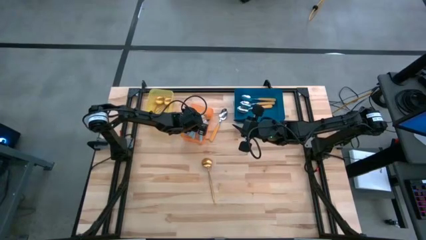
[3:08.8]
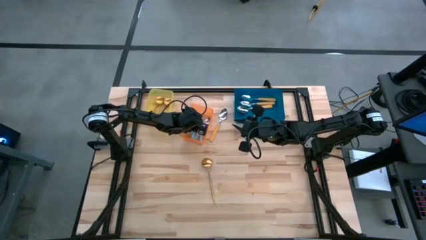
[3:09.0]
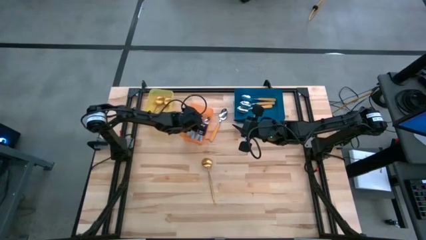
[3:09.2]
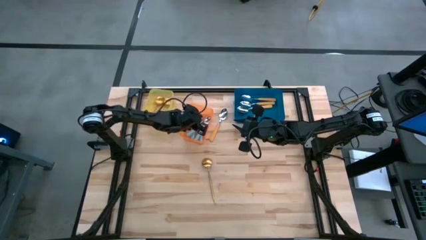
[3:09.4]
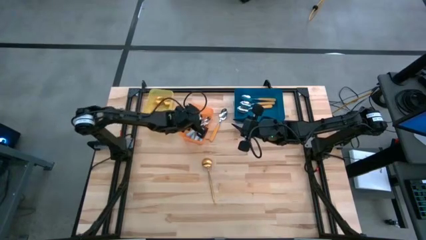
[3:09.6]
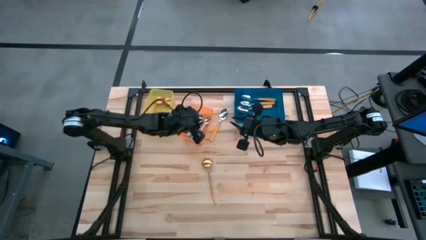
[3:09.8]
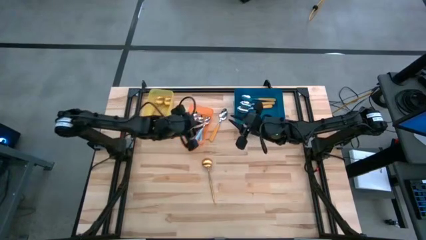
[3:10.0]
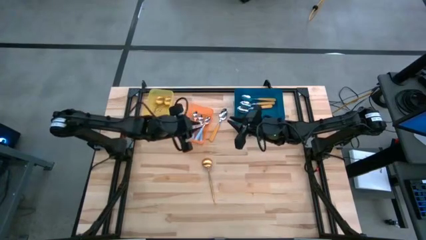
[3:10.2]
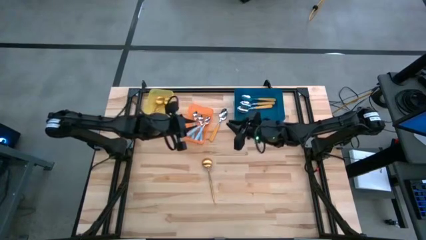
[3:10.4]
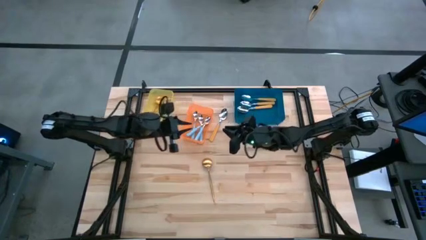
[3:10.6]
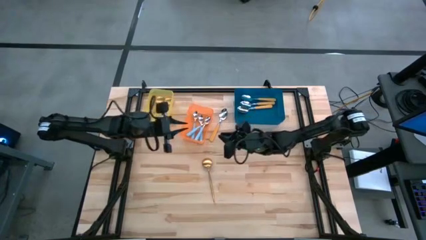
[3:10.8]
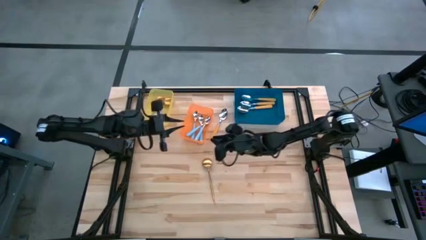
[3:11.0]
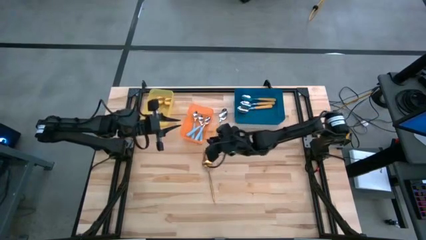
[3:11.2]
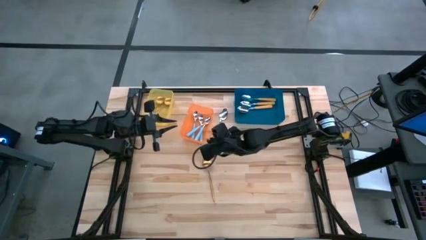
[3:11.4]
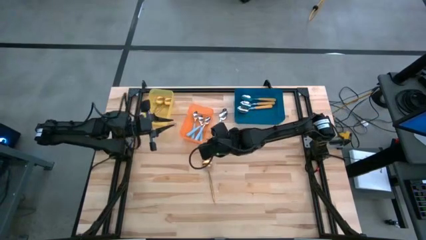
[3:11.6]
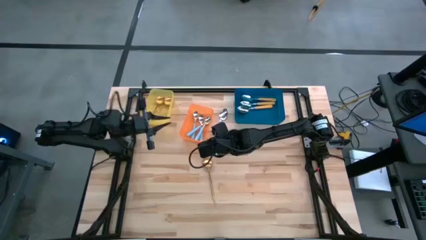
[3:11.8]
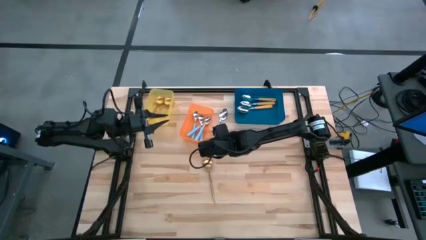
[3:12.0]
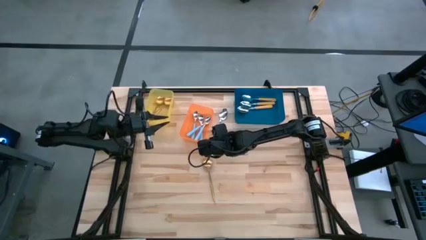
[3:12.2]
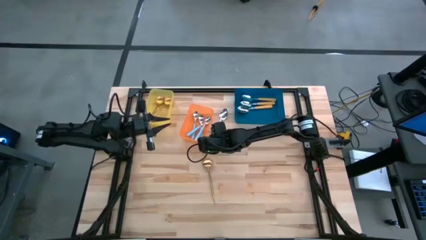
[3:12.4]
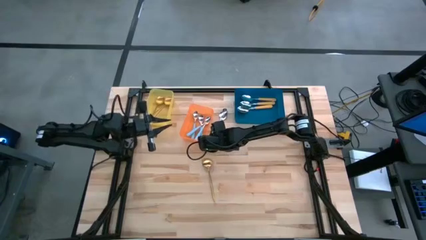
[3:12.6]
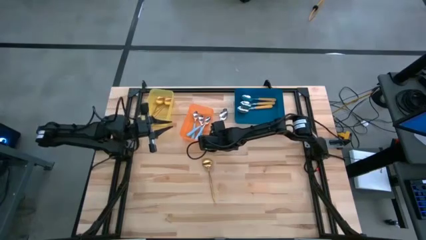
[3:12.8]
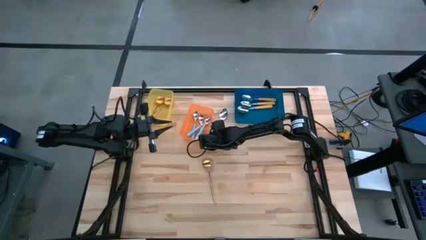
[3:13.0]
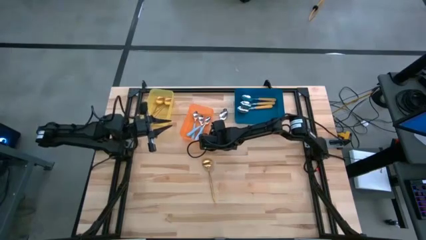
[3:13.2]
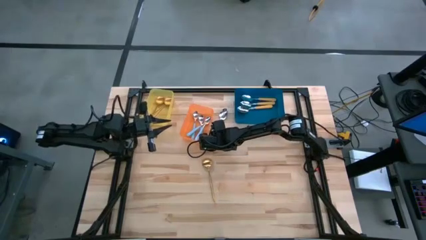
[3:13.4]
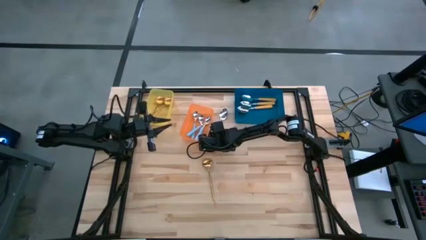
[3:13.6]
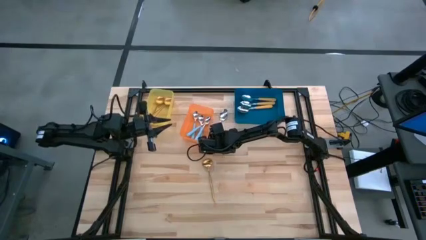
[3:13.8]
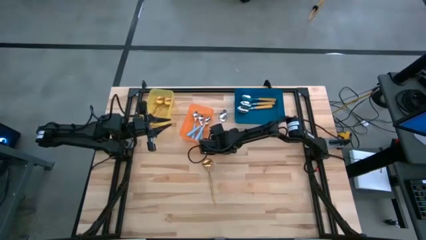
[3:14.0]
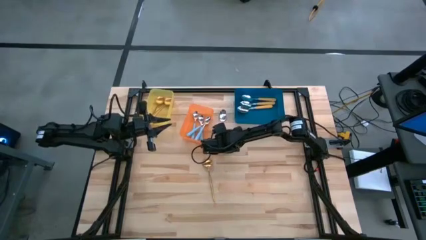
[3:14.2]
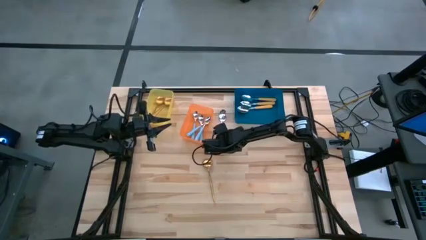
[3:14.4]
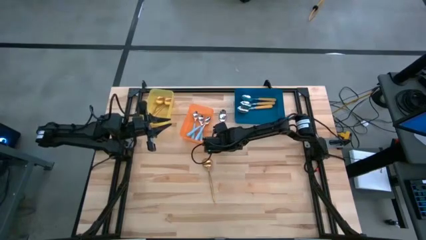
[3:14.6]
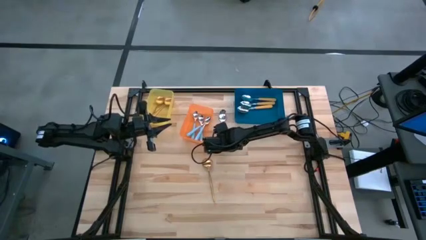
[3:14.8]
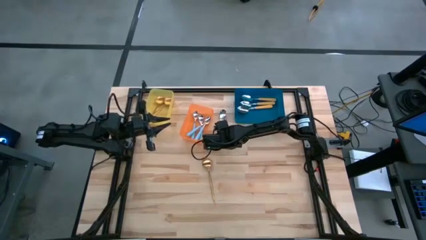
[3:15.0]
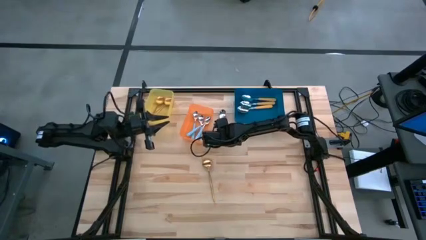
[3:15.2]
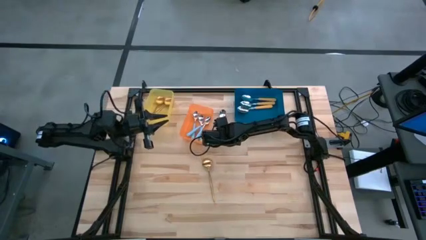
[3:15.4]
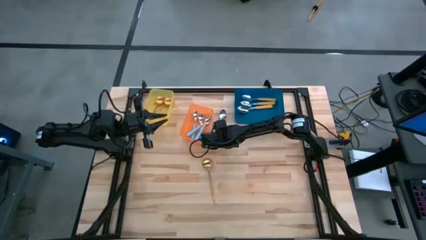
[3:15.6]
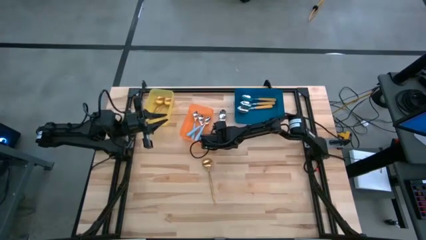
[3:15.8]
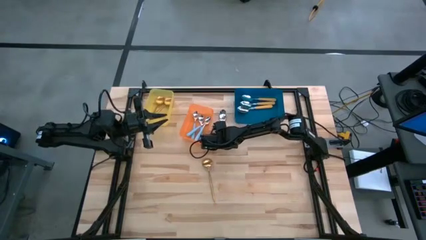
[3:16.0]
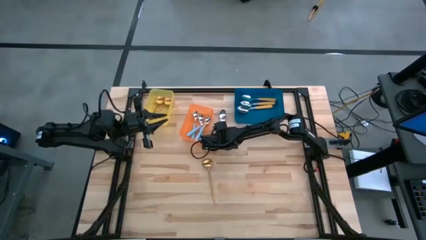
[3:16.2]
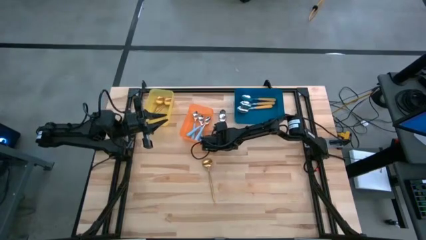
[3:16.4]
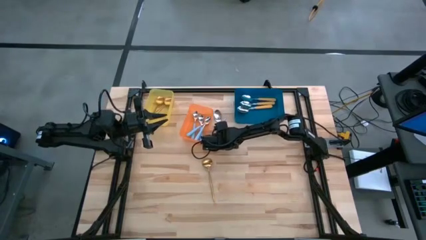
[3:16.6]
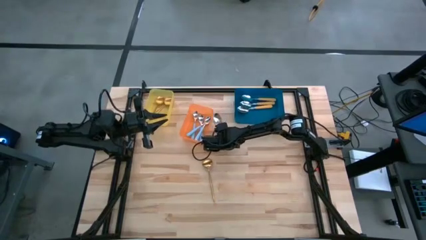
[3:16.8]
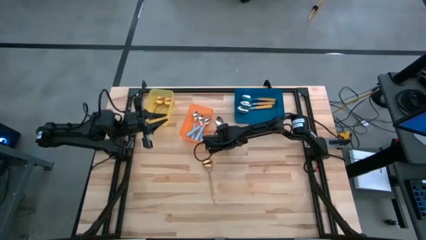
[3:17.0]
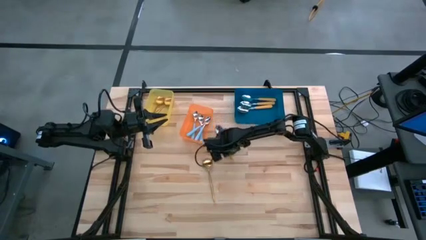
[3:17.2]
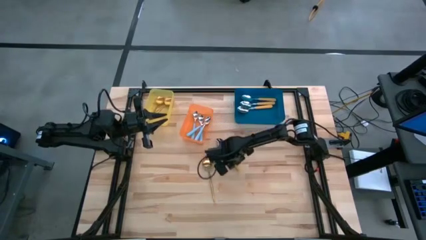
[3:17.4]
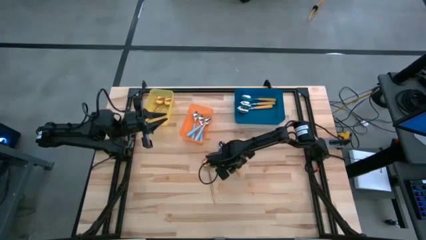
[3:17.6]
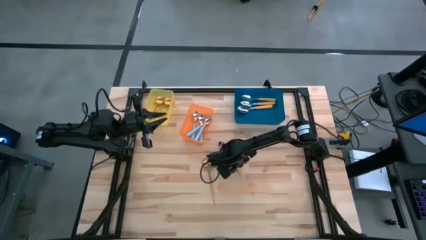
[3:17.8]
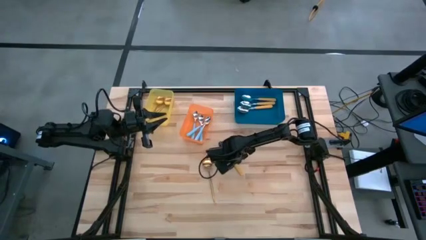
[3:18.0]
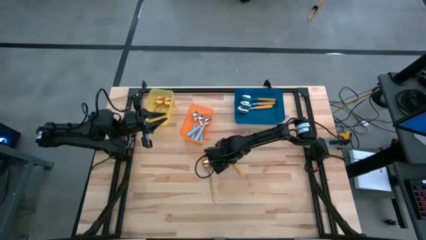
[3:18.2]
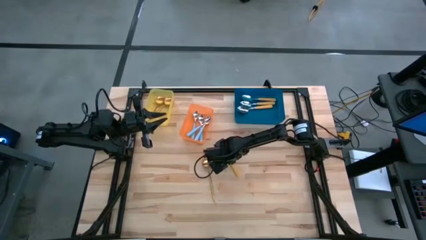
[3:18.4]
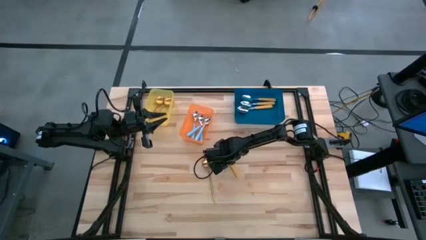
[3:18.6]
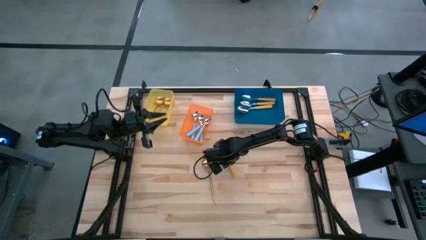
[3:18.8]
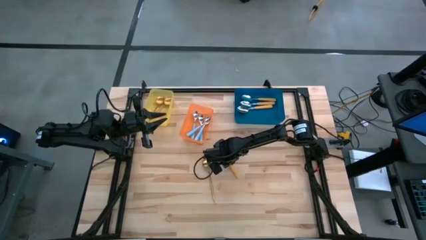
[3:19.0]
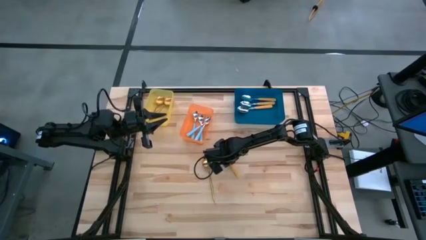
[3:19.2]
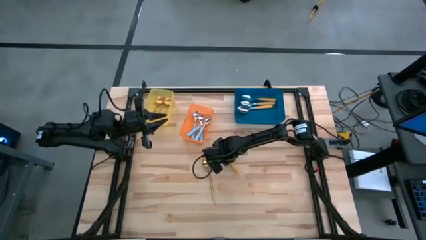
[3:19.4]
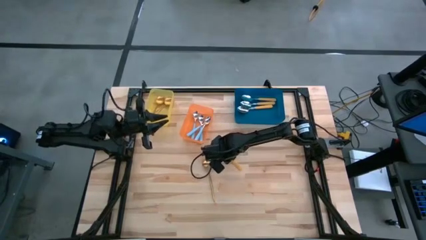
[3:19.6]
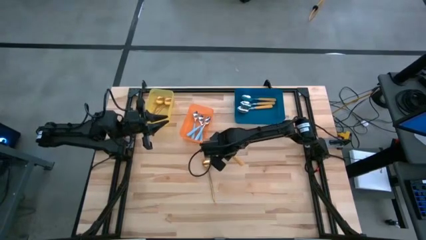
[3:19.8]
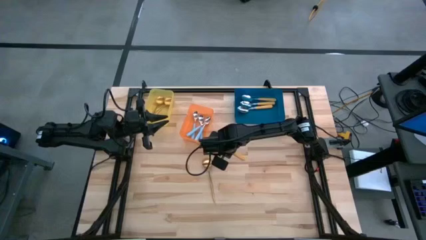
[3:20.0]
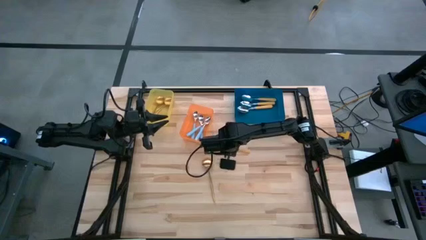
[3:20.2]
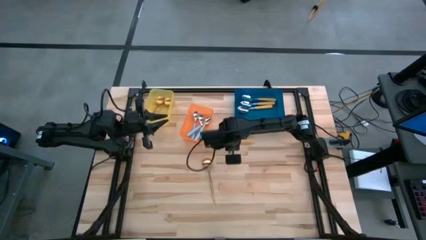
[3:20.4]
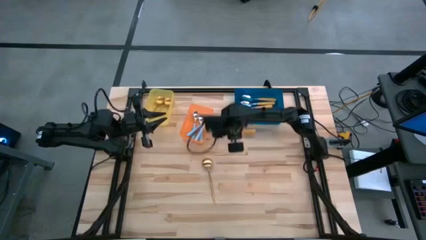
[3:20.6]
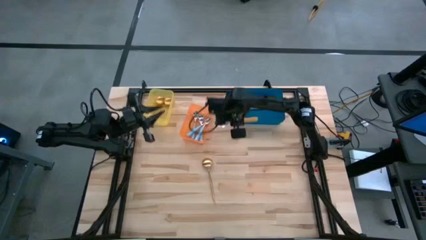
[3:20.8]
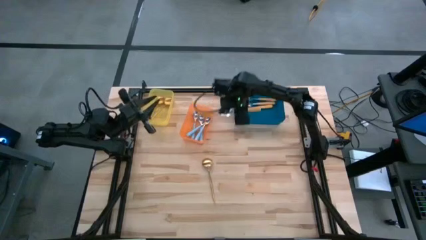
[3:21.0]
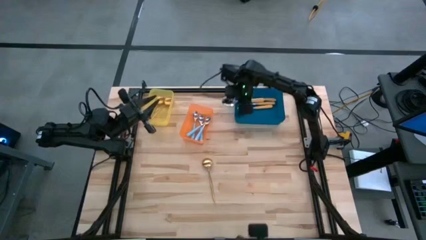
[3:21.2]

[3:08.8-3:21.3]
Task: Sort silverware by color (type)
Put the yellow spoon into the blue bin
